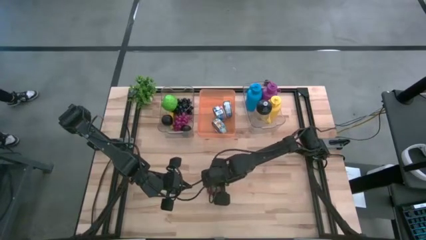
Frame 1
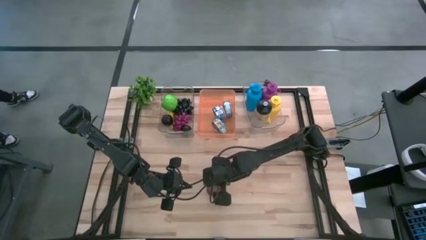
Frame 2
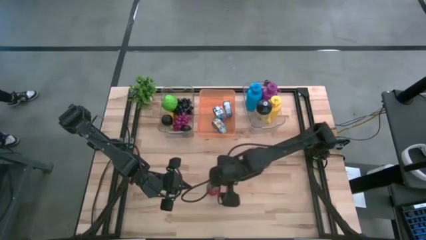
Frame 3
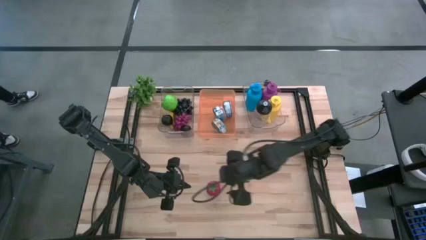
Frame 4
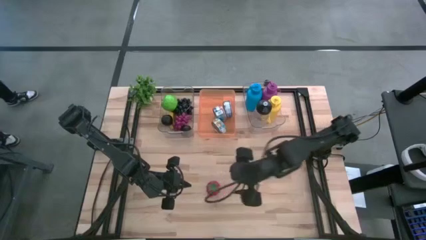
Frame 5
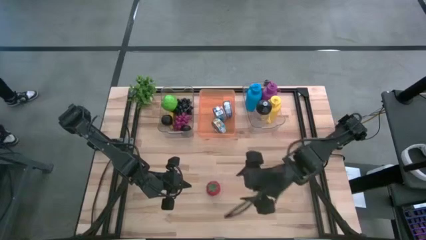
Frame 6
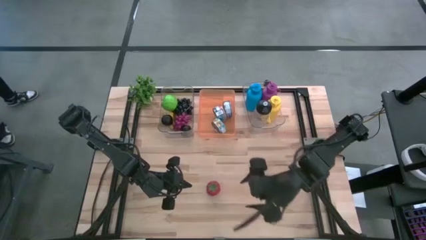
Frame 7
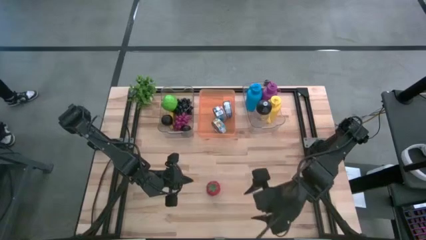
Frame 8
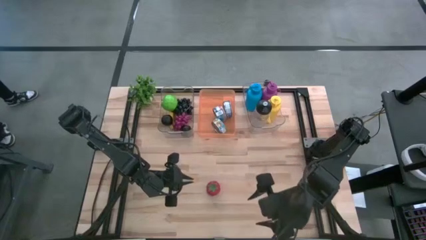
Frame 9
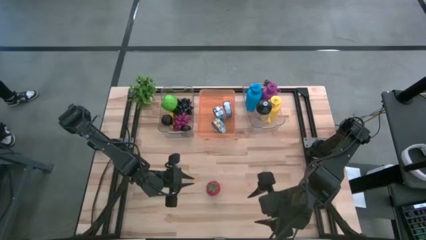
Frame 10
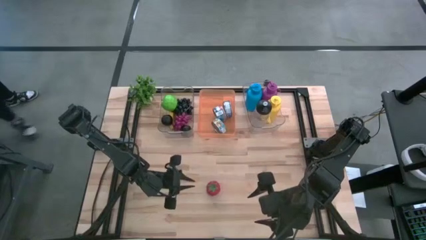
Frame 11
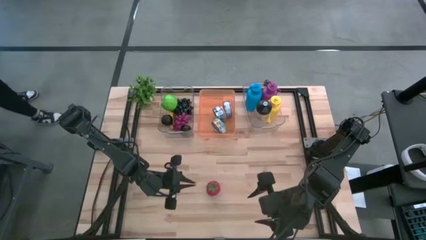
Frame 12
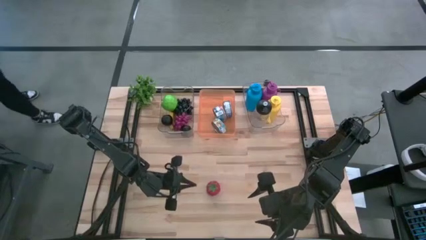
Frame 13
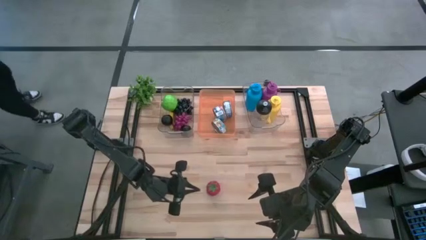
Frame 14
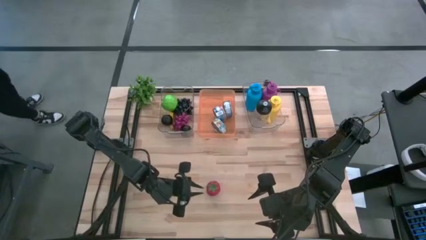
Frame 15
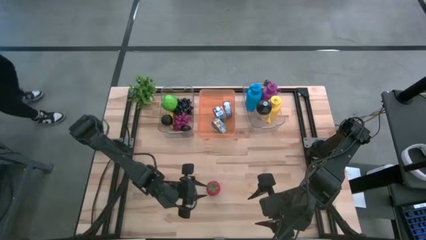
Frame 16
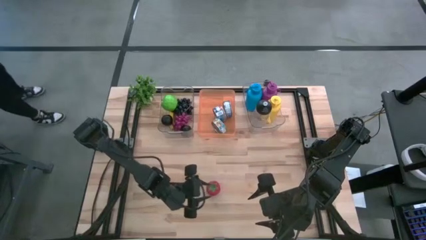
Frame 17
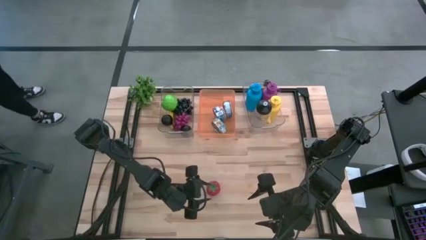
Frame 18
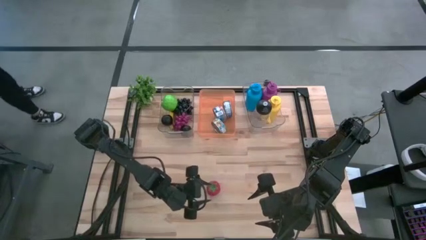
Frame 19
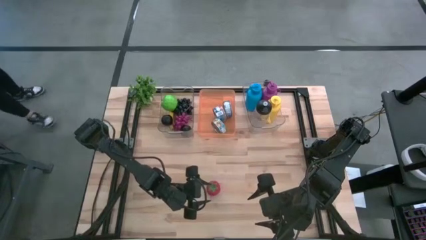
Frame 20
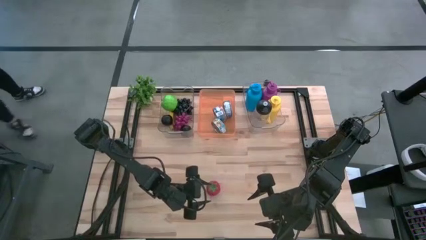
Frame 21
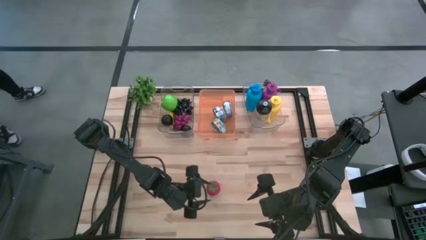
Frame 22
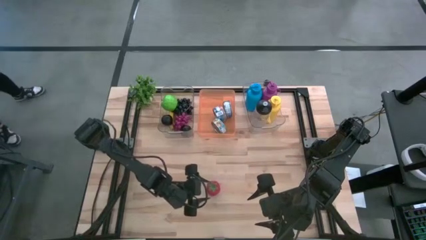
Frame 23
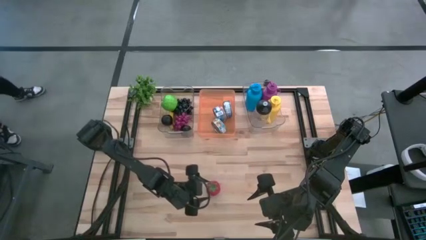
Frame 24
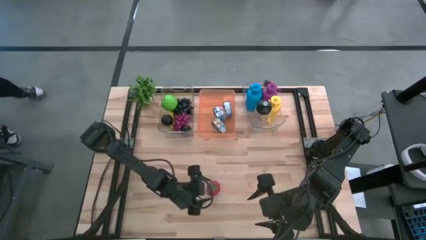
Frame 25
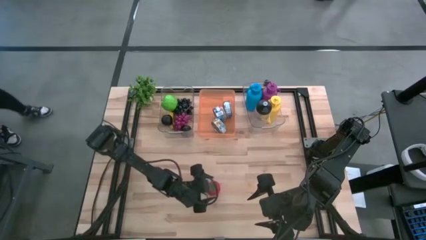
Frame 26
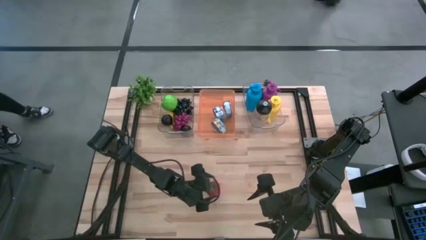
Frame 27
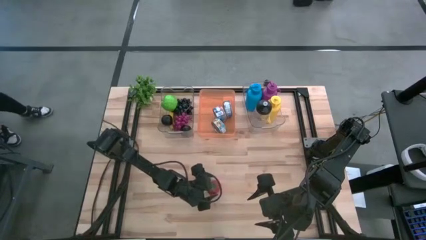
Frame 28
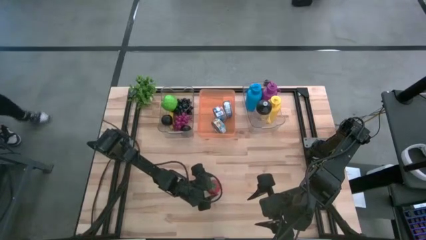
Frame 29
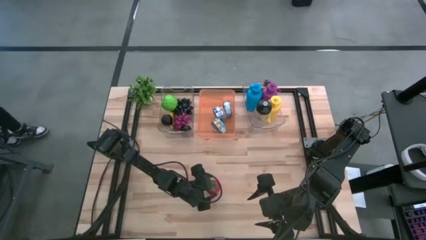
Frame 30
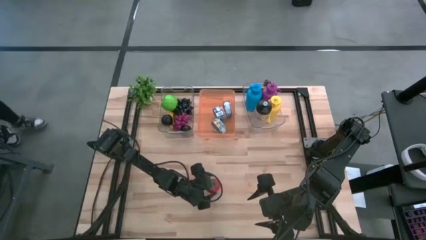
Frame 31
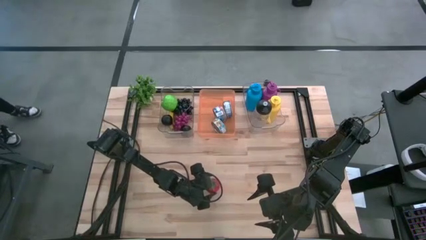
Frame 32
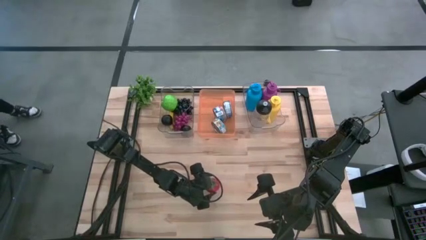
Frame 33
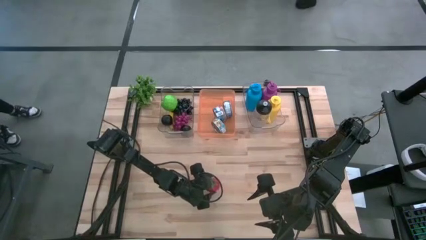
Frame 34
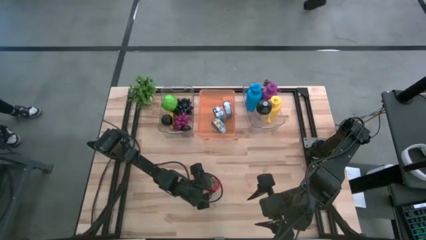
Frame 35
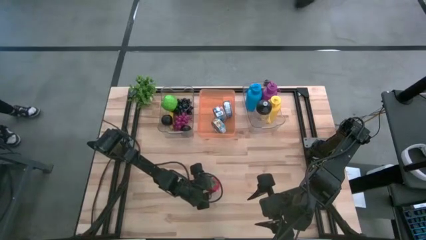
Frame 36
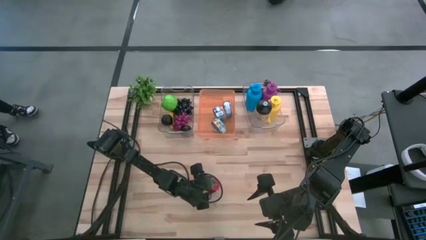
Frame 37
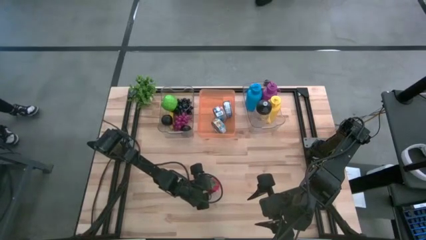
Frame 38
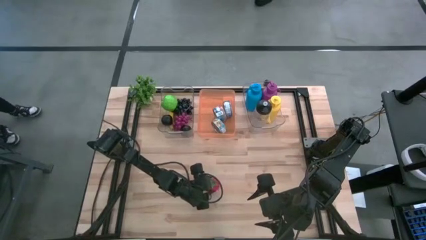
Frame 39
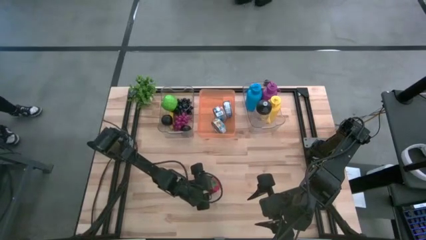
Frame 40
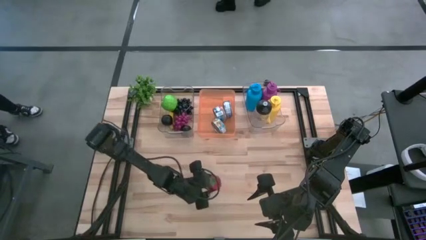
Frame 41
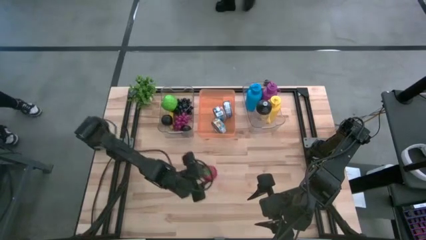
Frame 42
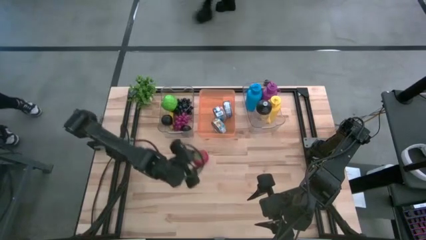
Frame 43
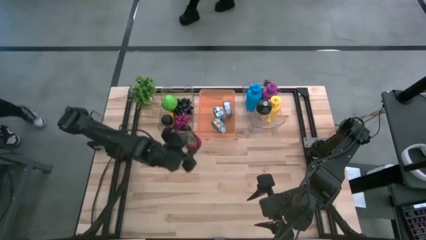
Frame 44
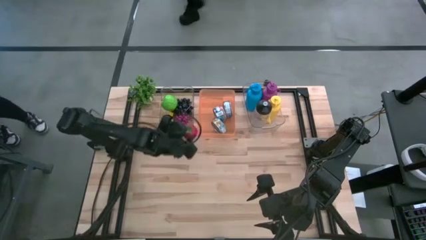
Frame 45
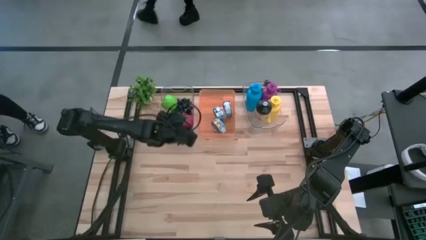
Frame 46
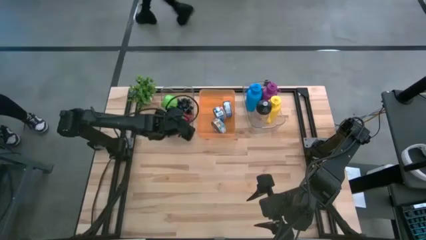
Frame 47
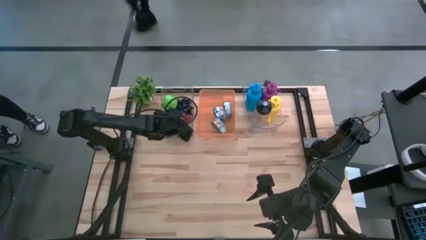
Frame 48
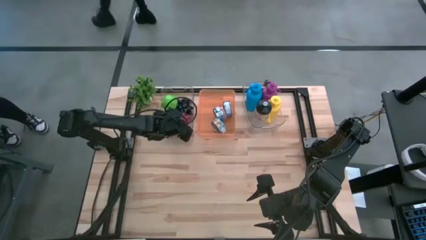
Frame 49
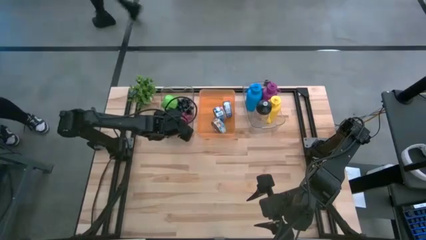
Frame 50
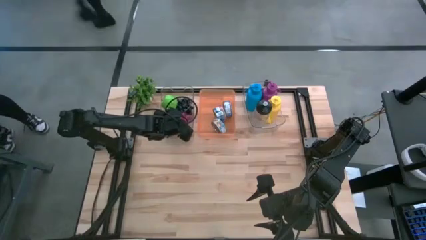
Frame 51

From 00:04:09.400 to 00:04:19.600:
Task: Pick & Place Food Item
Put the red tomato into the left transparent bin

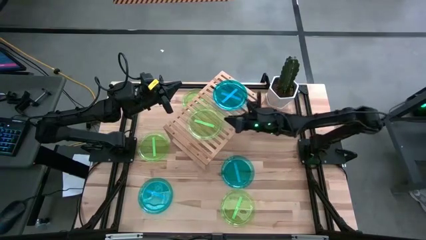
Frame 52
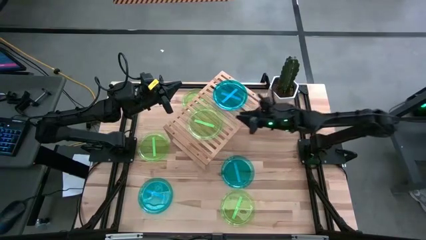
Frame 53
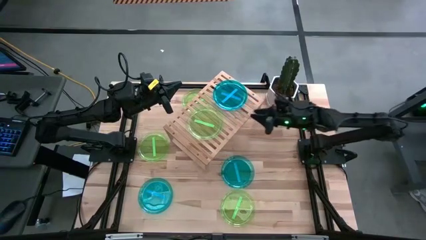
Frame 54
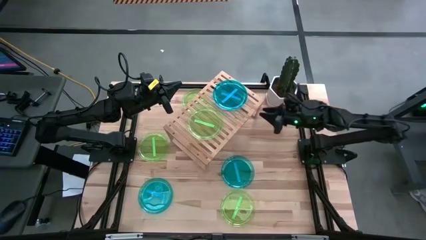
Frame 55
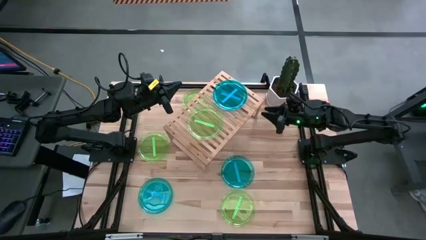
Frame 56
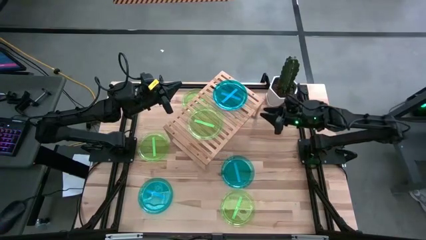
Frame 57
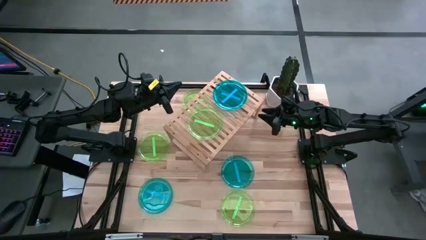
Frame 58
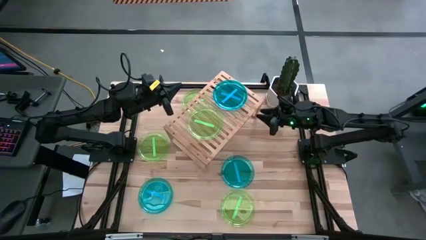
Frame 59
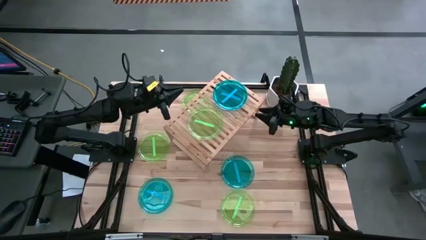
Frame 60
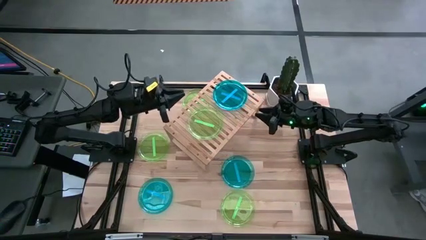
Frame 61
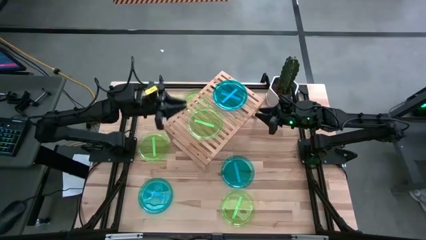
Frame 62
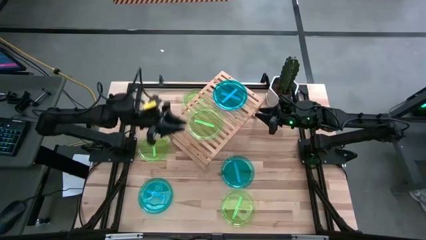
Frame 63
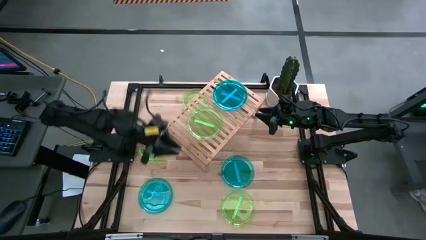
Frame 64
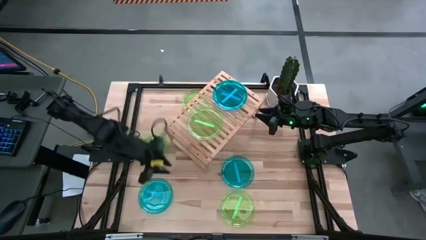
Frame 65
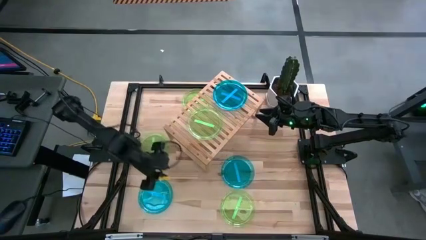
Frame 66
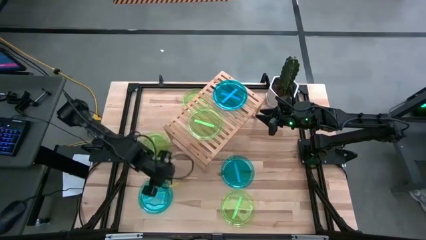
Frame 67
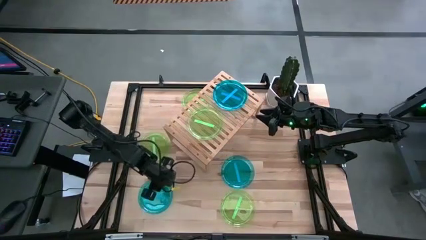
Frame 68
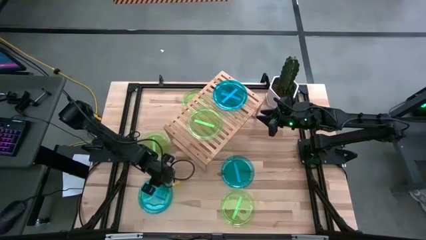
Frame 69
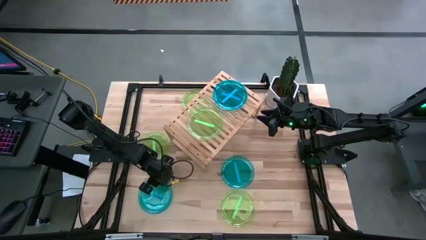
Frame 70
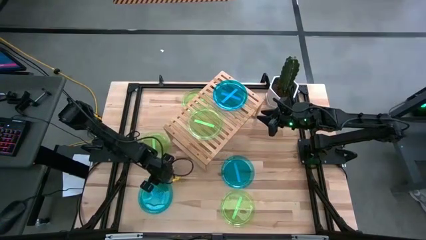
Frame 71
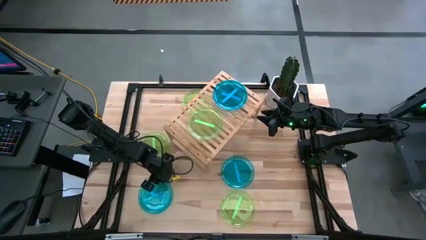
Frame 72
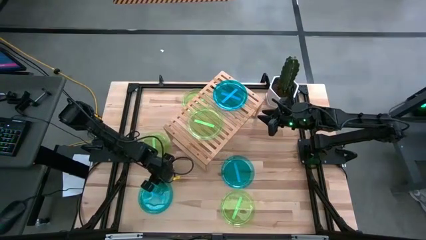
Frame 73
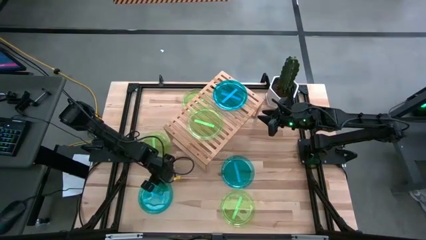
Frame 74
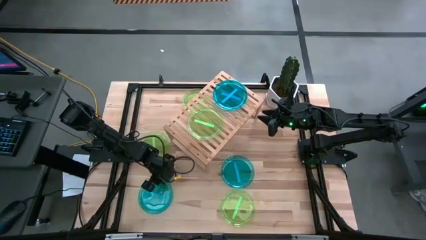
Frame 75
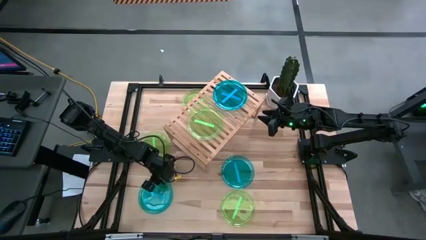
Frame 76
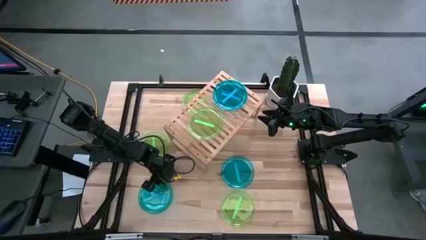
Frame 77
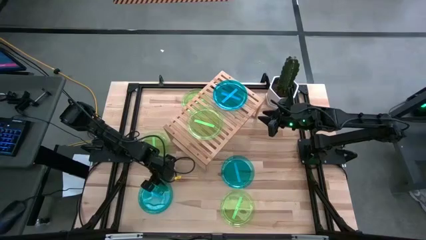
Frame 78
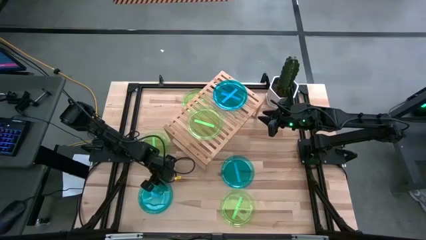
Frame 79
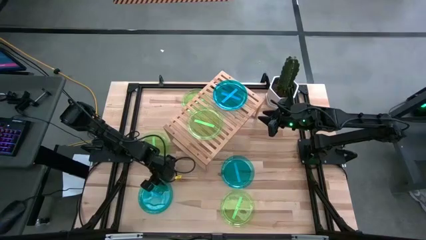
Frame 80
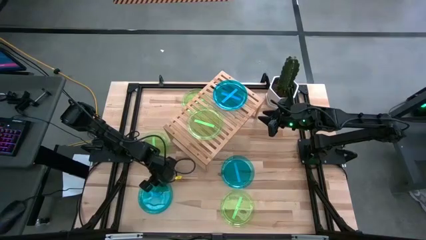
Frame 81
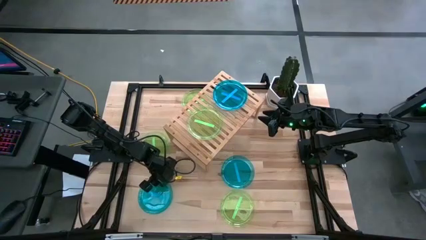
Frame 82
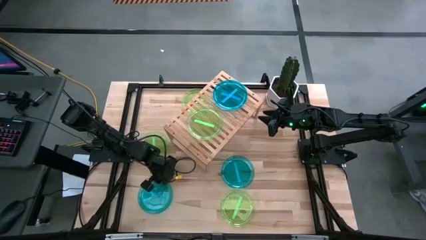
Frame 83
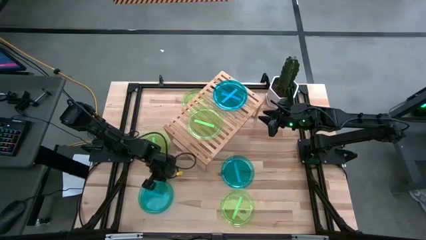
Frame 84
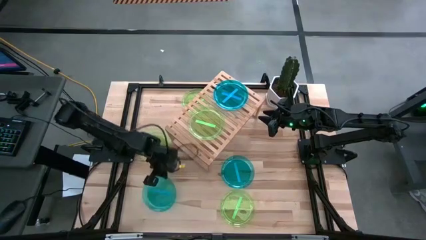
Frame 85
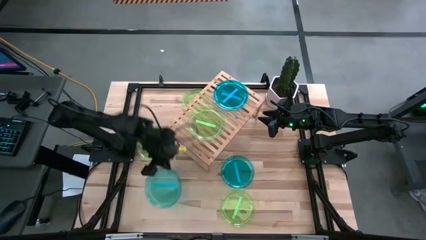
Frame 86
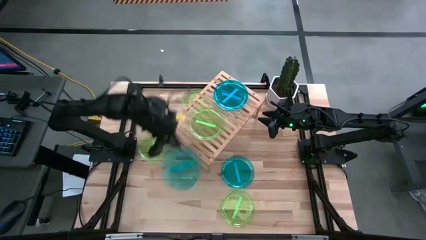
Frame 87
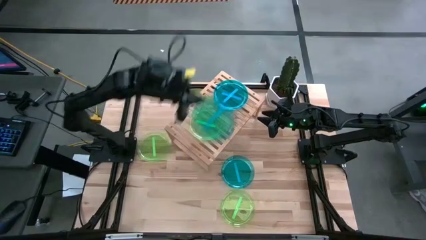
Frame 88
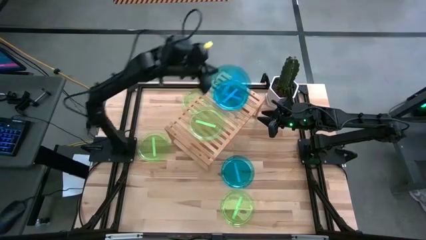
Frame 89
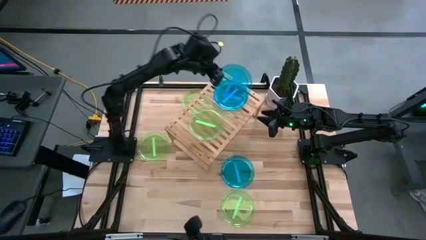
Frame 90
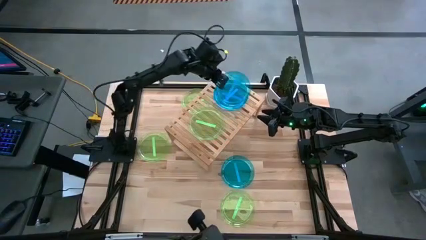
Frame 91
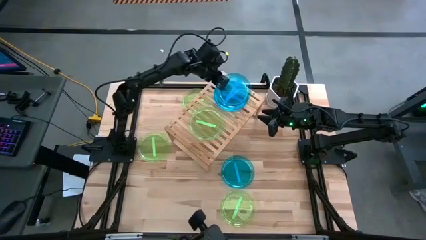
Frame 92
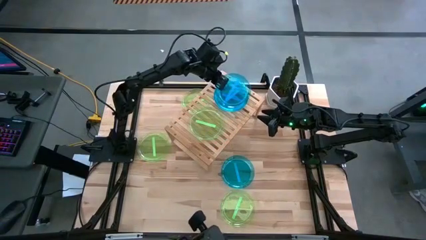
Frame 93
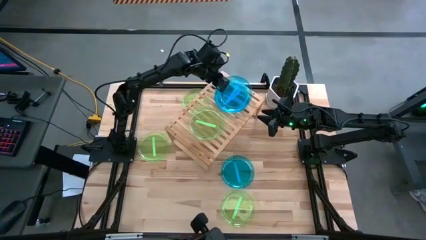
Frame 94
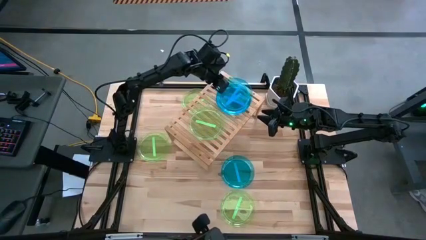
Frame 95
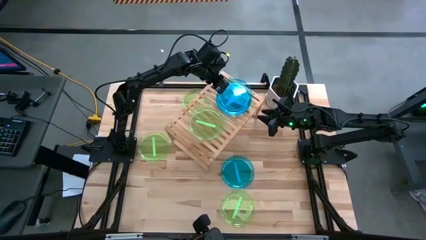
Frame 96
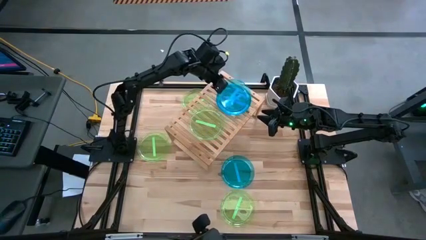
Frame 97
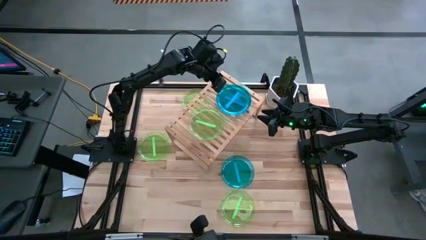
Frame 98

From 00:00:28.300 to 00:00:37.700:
Task: Place and stack plates onto a shelf
Stack the left blue plate on top of the blue plate on the shelf
